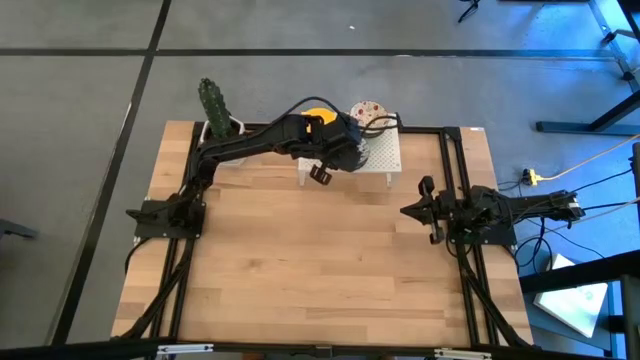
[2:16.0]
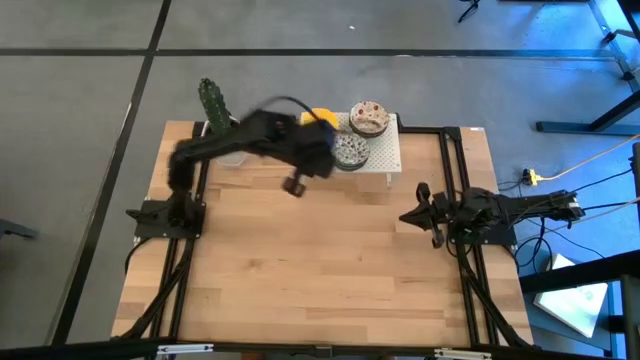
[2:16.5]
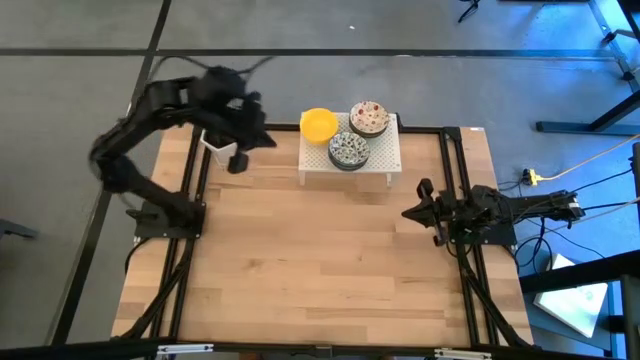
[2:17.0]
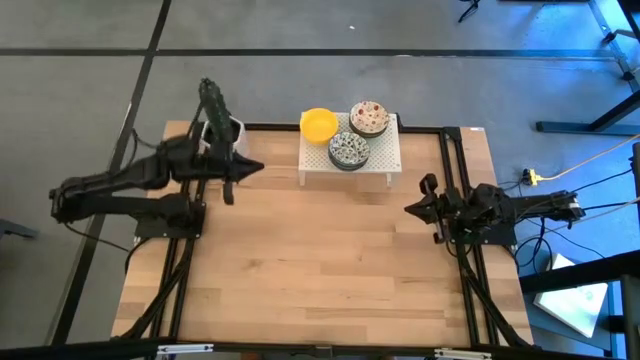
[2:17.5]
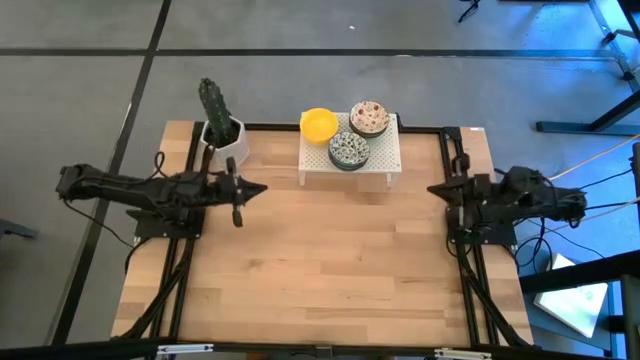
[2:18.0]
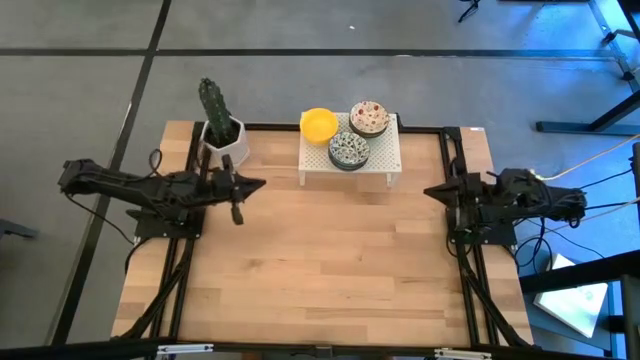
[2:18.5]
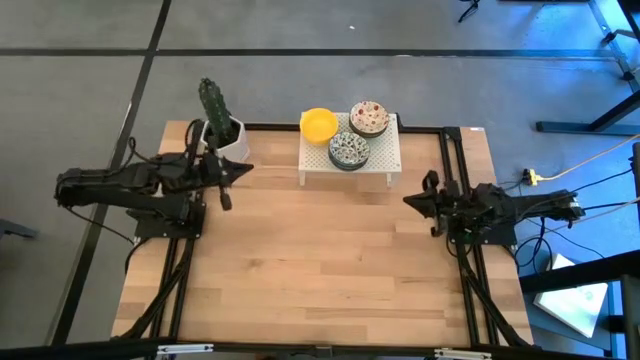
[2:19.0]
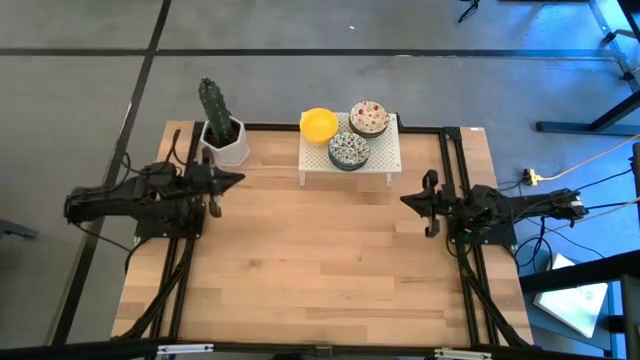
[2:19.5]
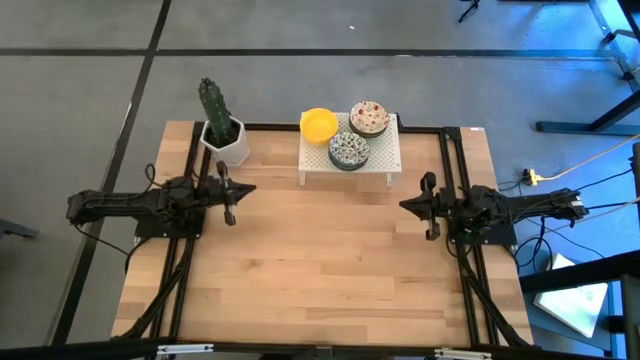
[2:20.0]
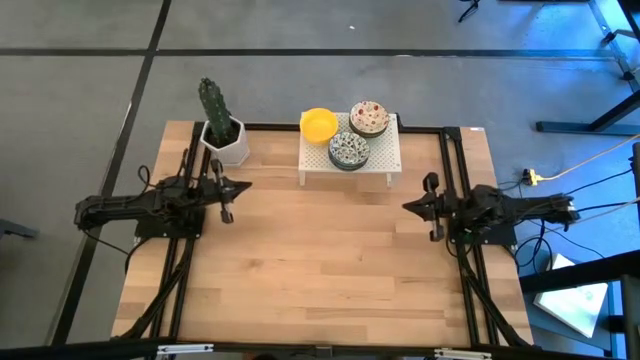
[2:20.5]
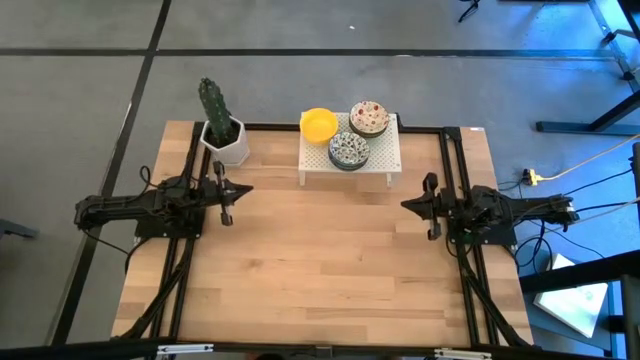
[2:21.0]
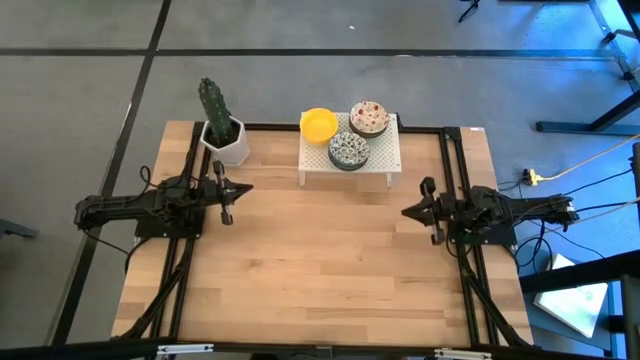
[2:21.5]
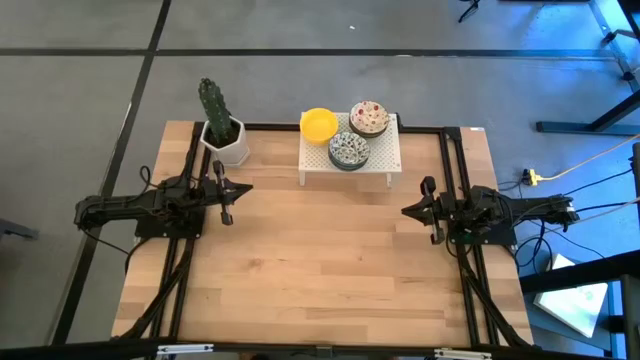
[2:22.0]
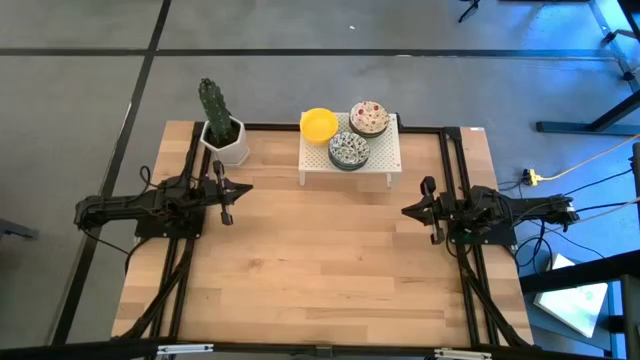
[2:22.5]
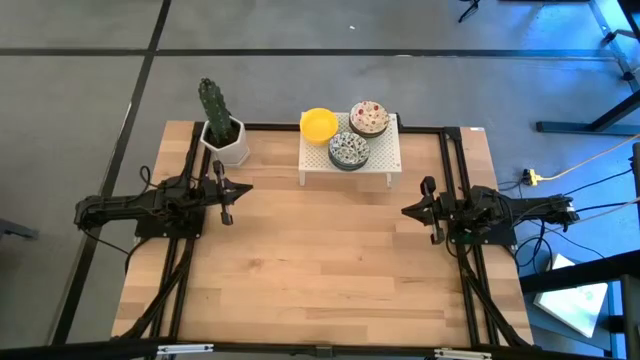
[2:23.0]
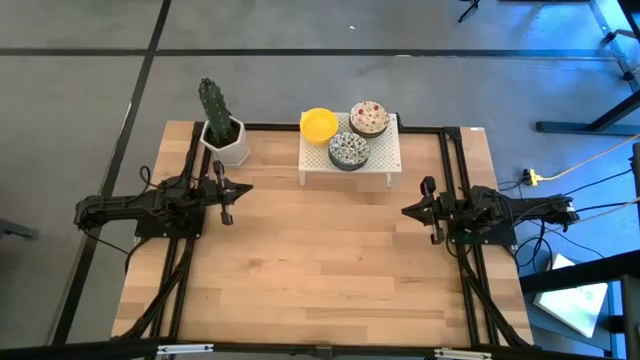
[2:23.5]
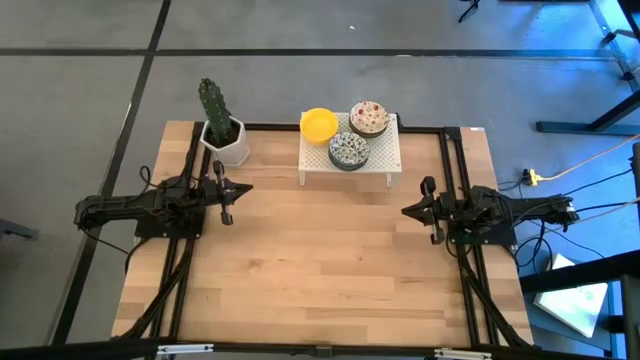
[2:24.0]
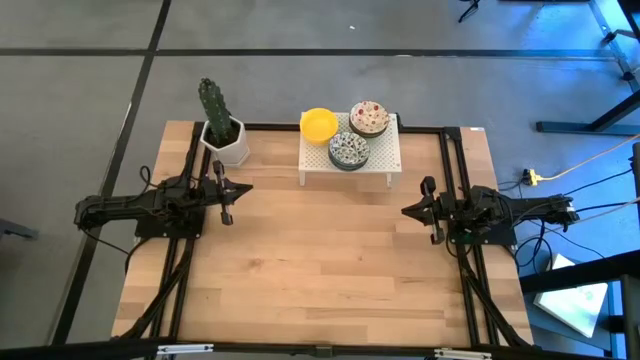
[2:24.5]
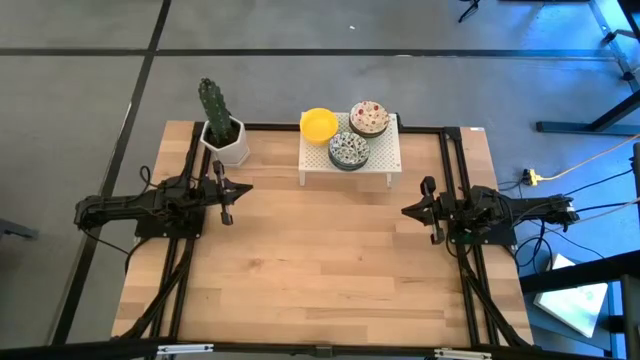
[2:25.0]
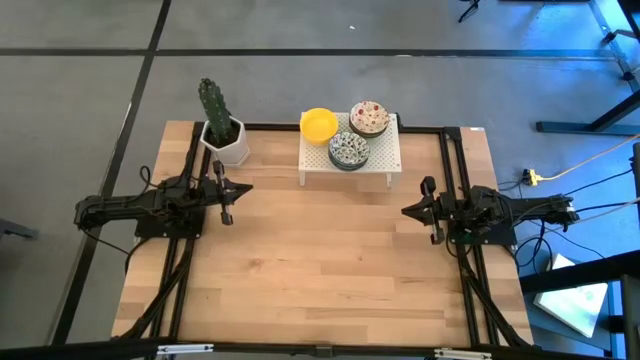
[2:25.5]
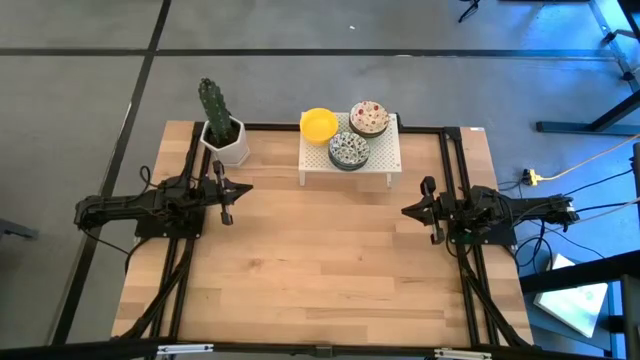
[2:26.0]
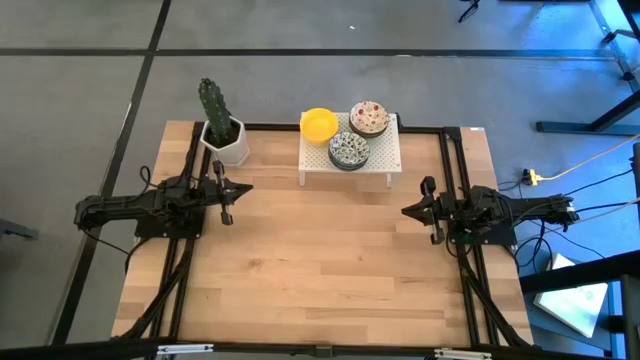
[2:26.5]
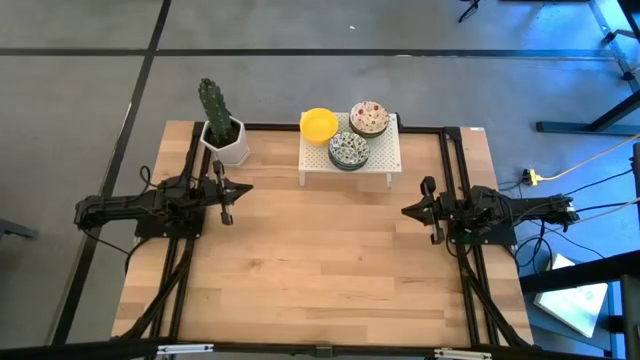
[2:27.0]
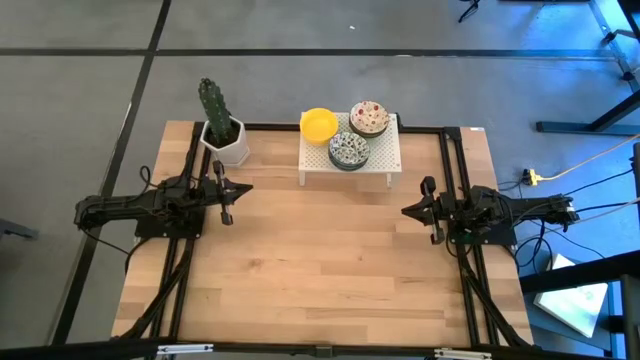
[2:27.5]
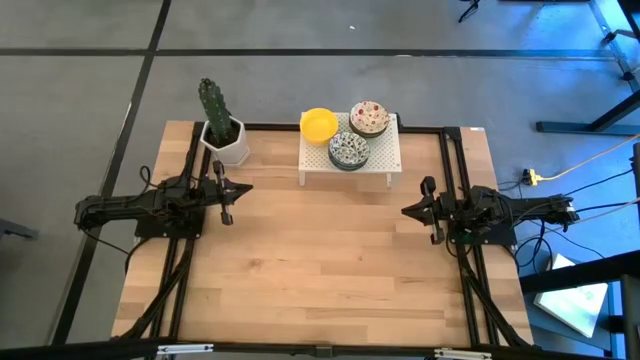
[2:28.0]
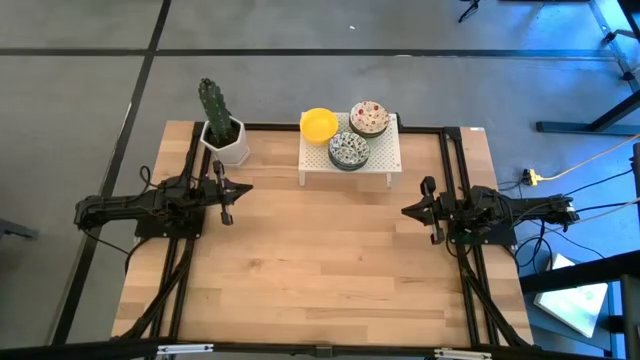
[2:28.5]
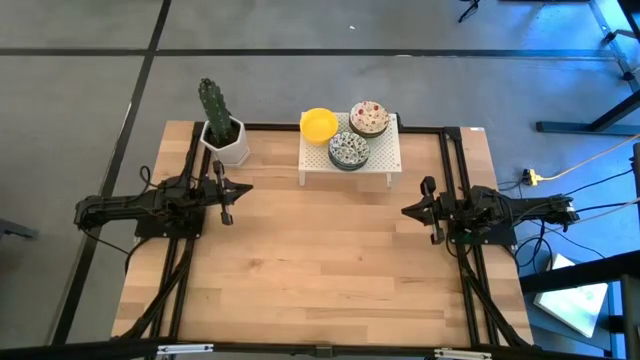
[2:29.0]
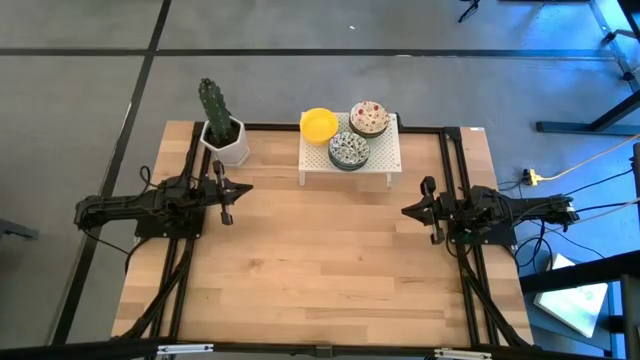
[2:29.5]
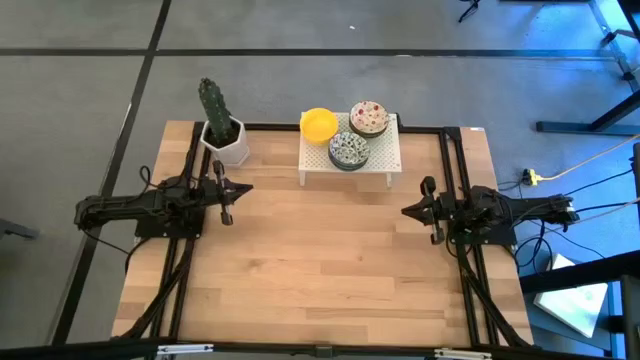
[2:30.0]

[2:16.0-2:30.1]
Task: Pick & Place Mini bowls
Return to Home Position

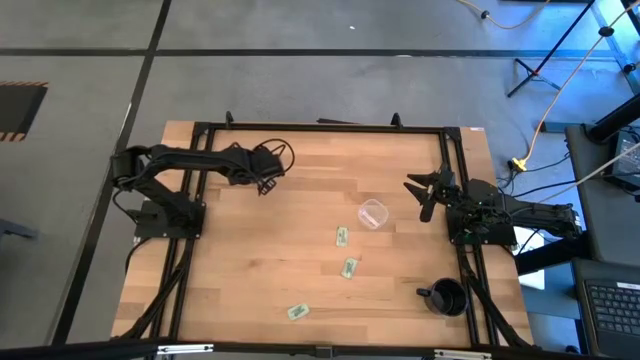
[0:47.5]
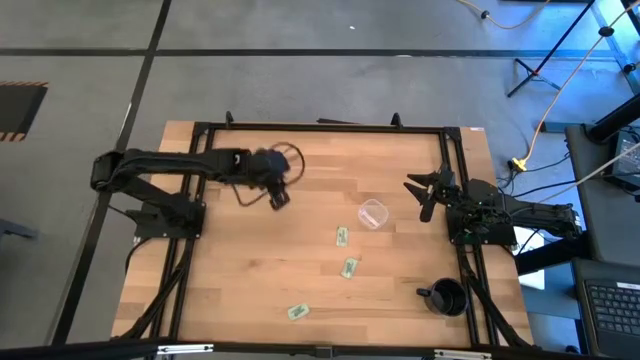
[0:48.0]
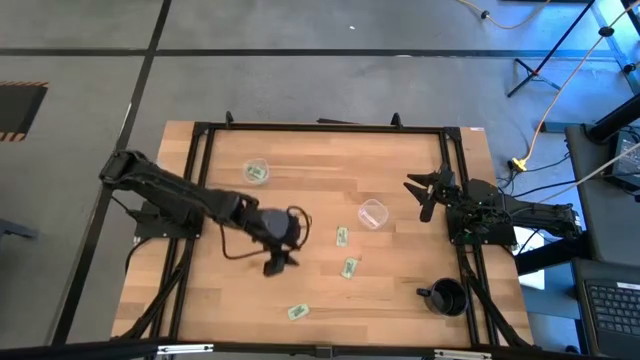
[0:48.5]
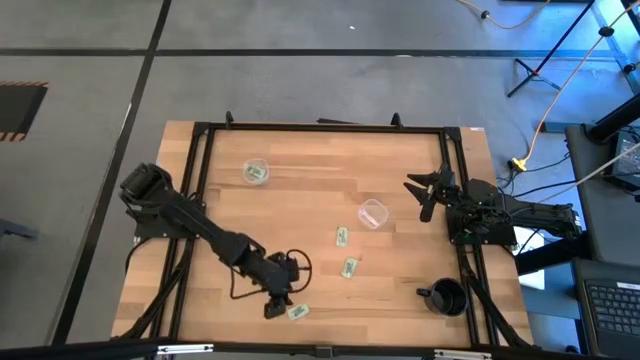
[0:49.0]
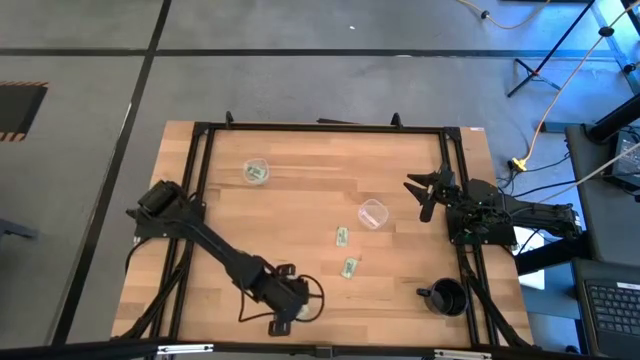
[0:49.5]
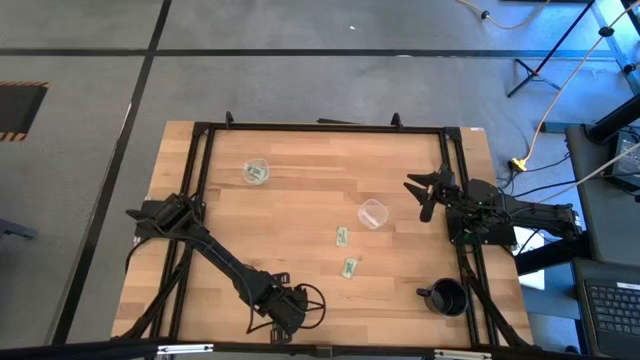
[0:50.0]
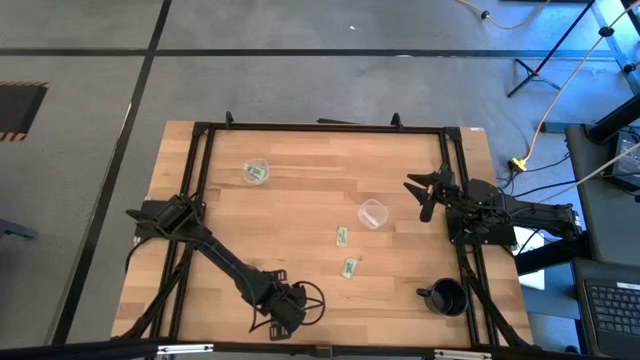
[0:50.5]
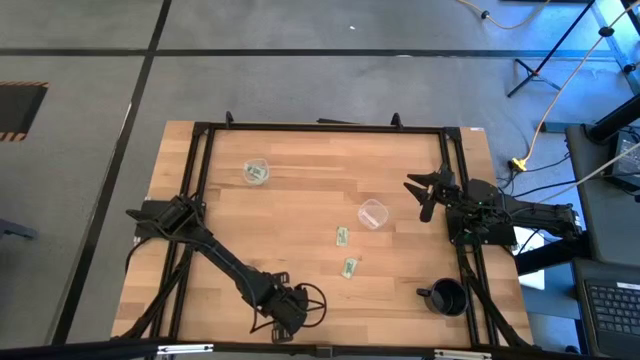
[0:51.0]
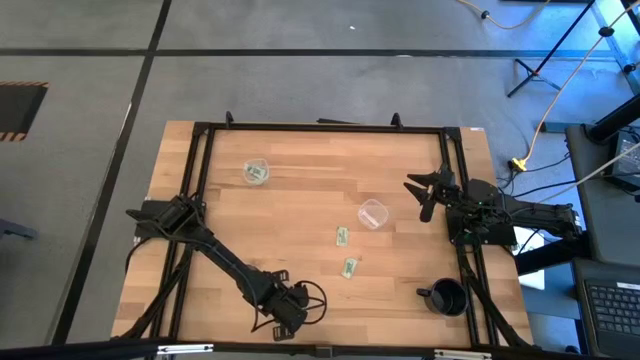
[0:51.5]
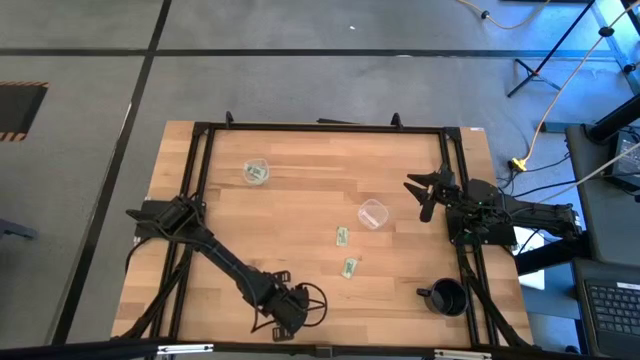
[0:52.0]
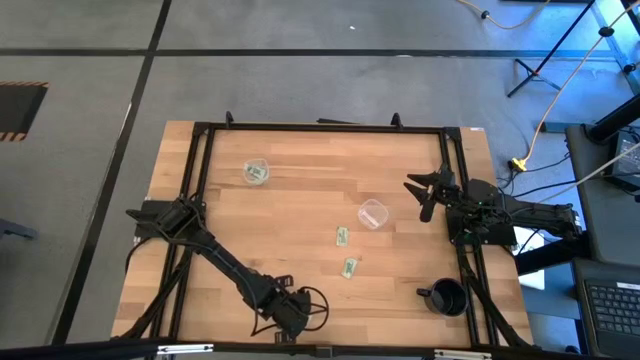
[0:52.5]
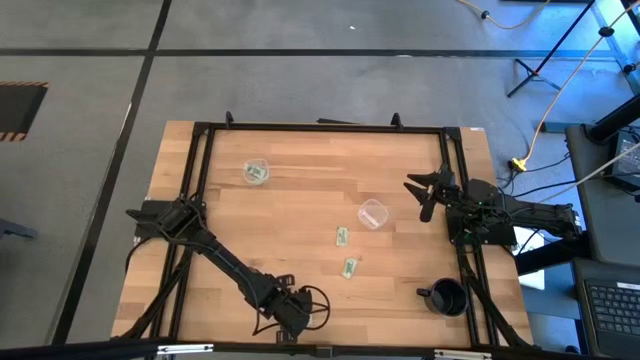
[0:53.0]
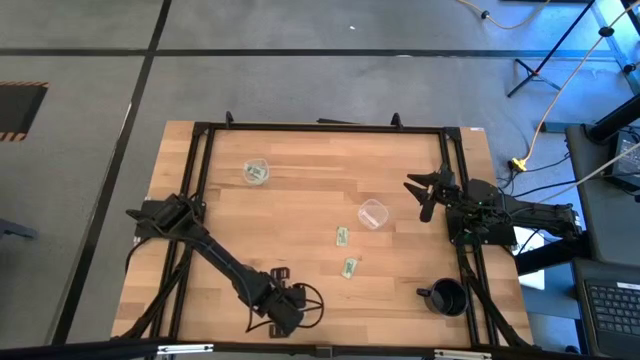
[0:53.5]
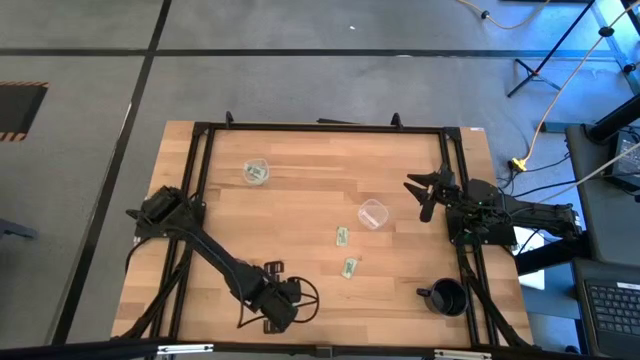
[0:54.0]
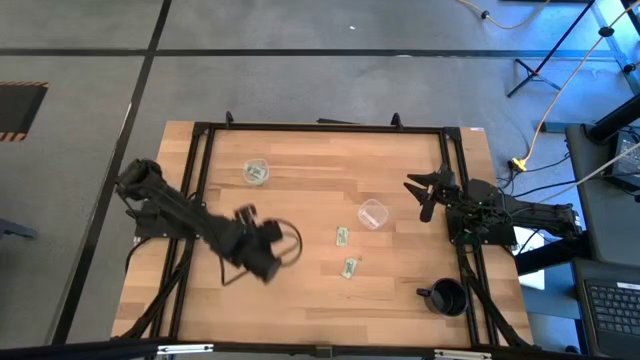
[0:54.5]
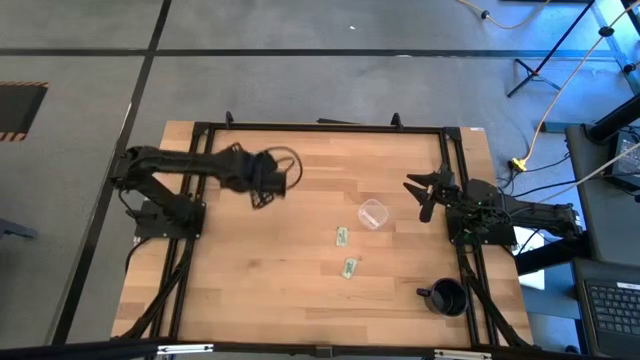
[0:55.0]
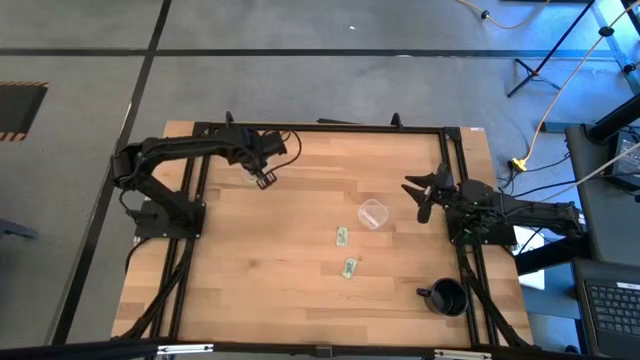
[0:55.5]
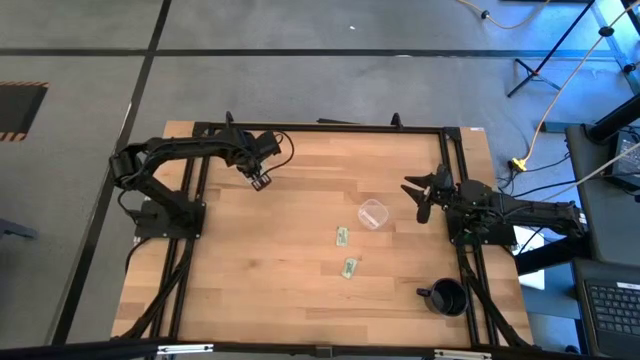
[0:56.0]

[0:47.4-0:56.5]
Task: Pick and place Stevia / Truvia into bins
Put the green stevia packet into the left white container
